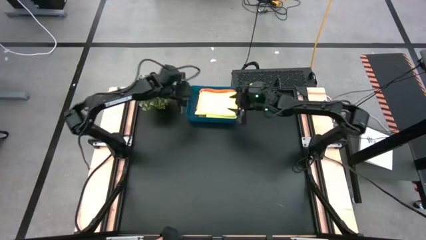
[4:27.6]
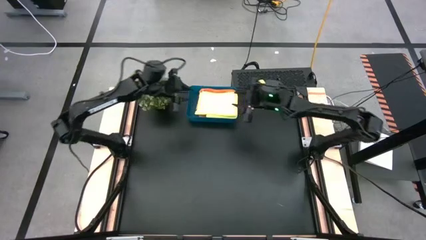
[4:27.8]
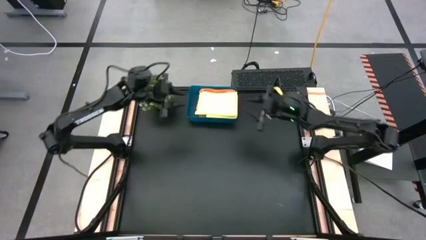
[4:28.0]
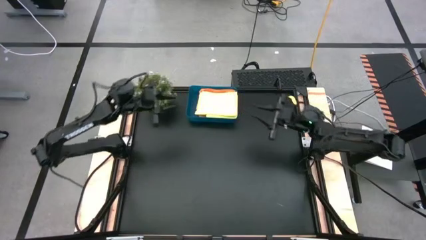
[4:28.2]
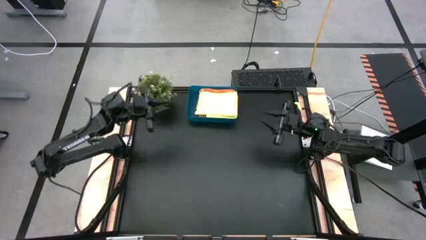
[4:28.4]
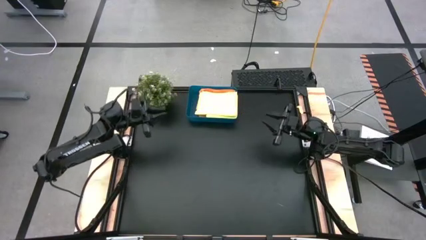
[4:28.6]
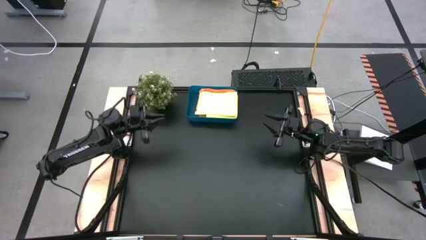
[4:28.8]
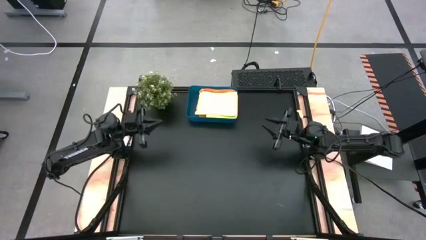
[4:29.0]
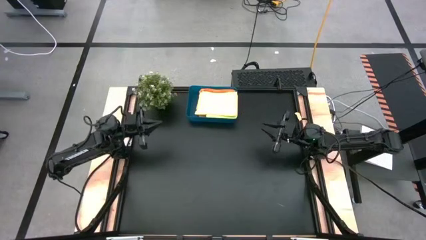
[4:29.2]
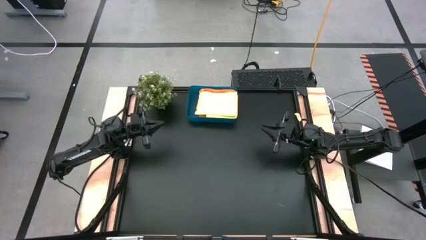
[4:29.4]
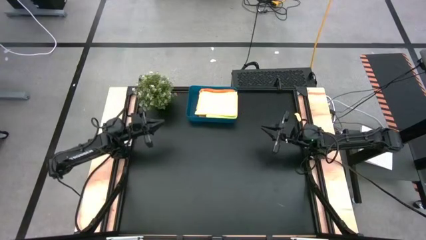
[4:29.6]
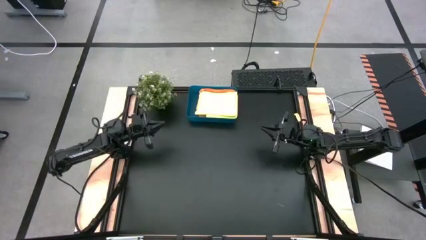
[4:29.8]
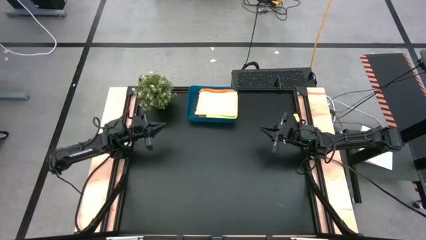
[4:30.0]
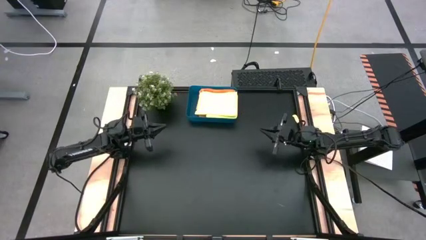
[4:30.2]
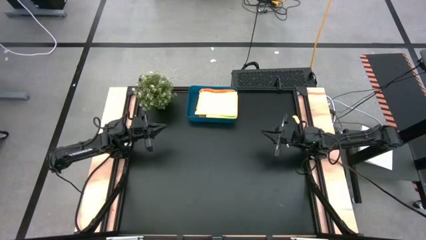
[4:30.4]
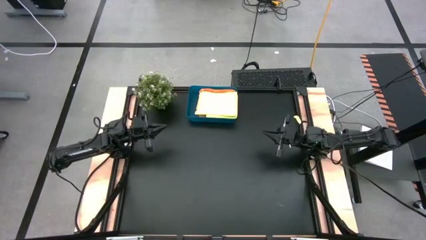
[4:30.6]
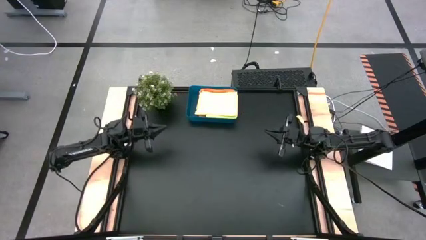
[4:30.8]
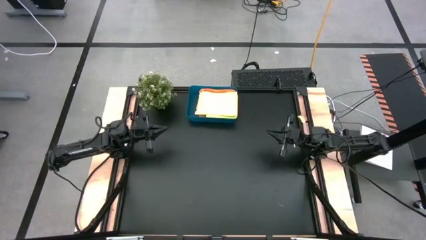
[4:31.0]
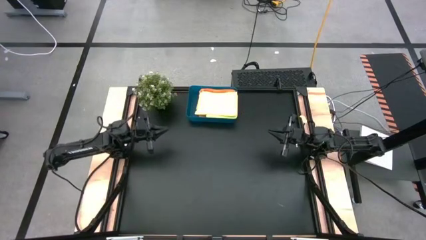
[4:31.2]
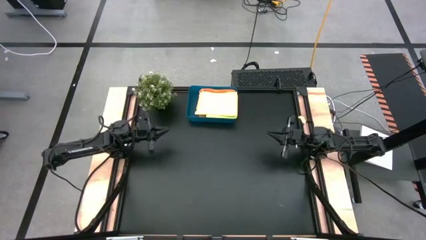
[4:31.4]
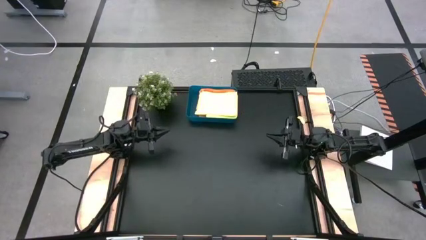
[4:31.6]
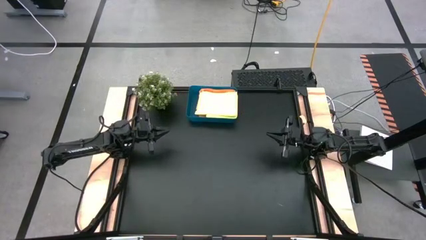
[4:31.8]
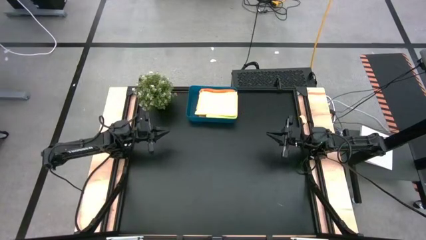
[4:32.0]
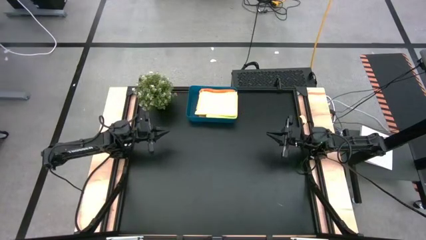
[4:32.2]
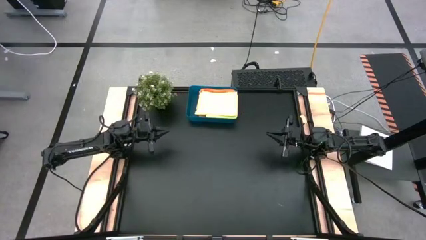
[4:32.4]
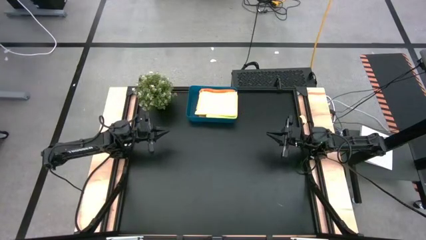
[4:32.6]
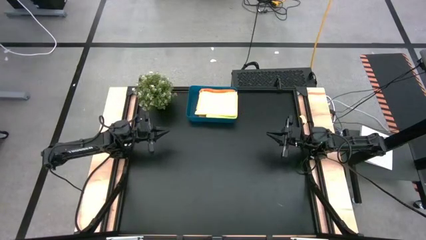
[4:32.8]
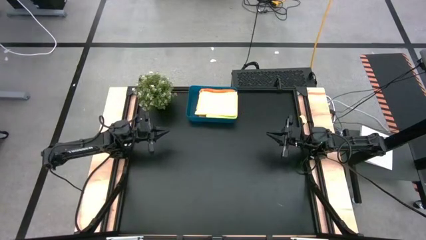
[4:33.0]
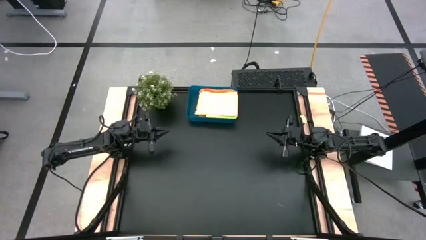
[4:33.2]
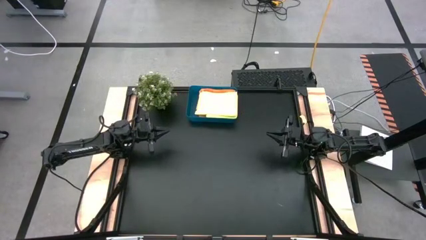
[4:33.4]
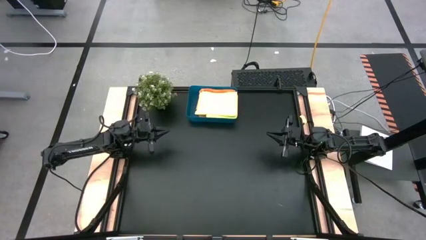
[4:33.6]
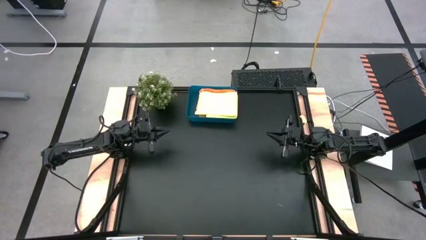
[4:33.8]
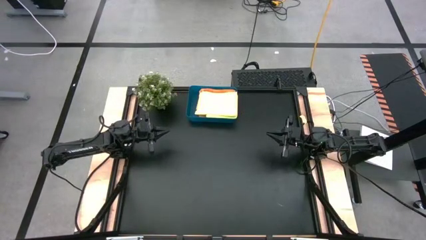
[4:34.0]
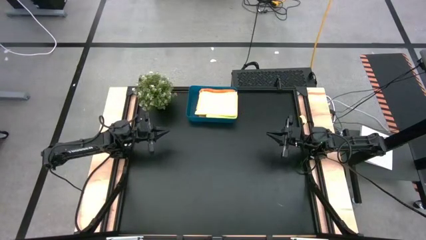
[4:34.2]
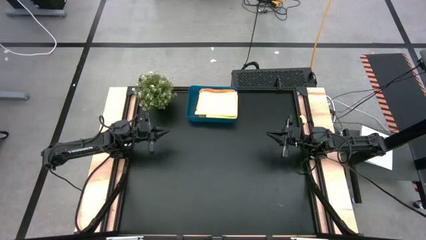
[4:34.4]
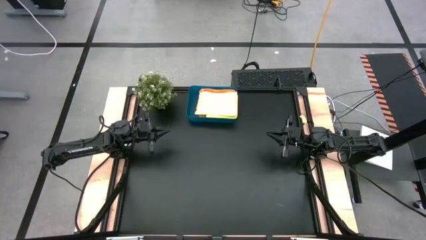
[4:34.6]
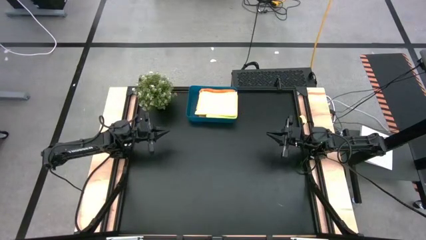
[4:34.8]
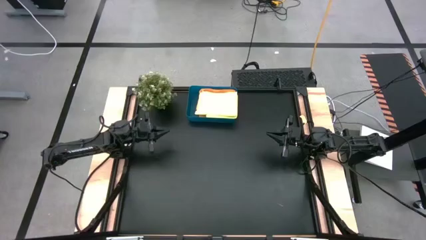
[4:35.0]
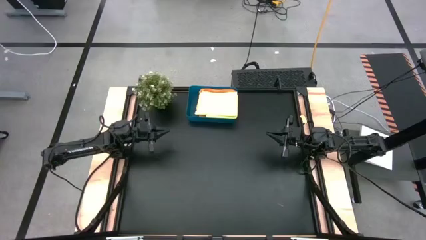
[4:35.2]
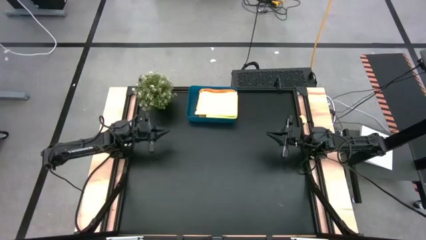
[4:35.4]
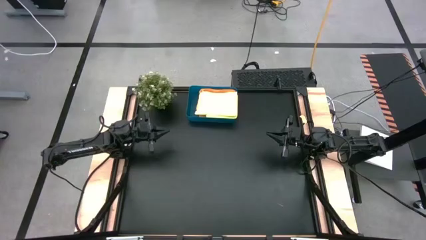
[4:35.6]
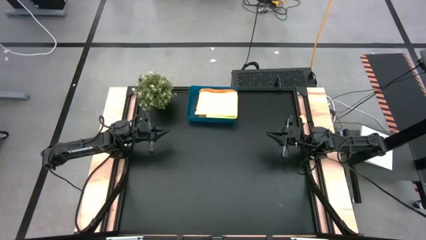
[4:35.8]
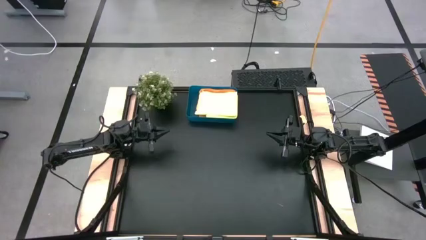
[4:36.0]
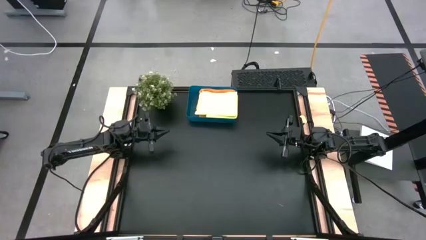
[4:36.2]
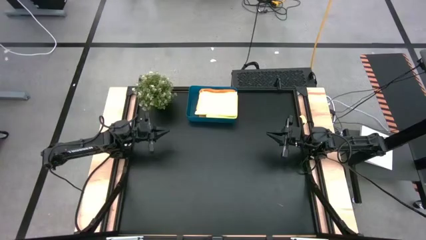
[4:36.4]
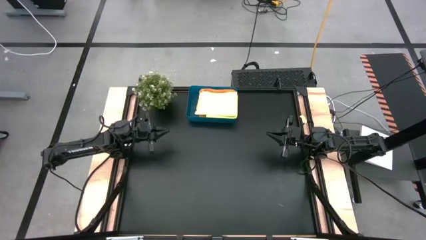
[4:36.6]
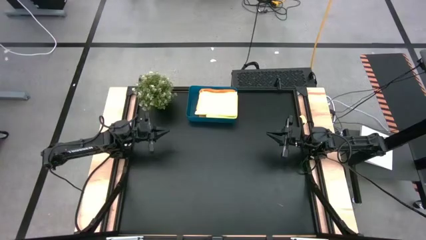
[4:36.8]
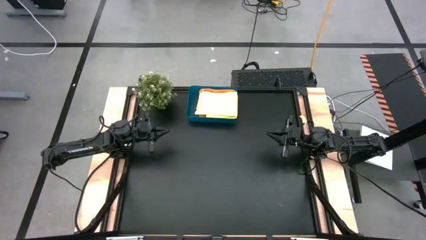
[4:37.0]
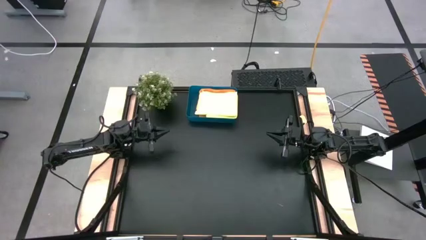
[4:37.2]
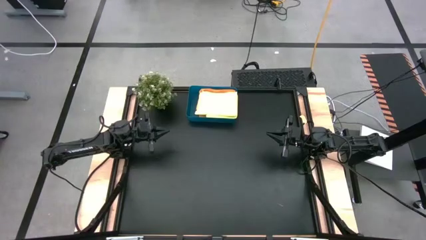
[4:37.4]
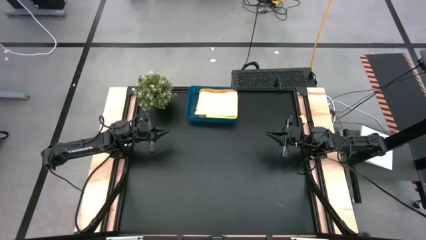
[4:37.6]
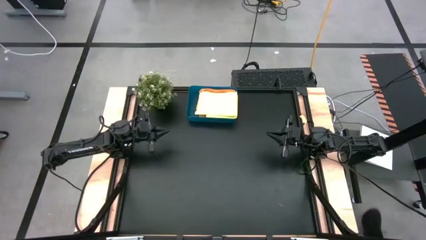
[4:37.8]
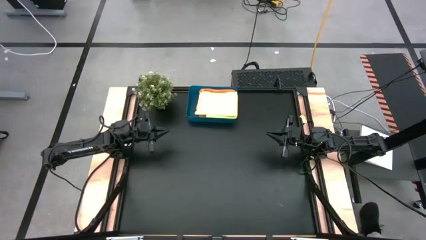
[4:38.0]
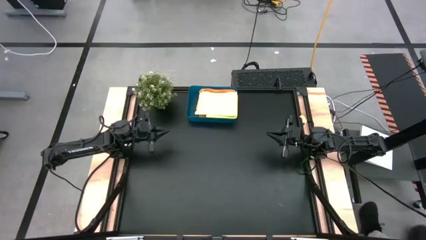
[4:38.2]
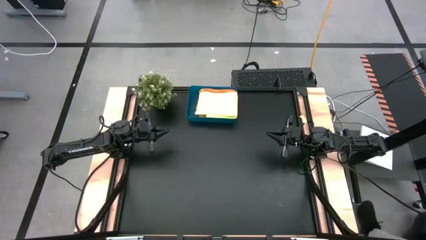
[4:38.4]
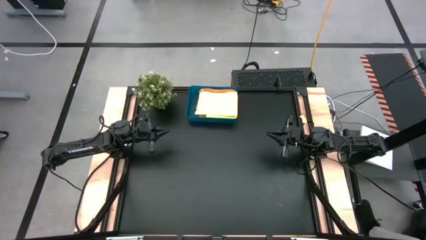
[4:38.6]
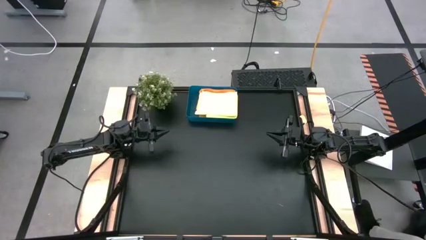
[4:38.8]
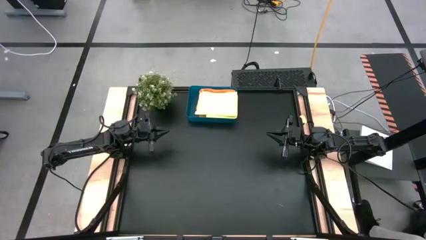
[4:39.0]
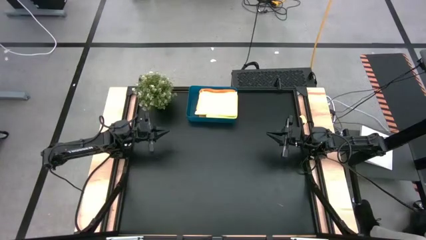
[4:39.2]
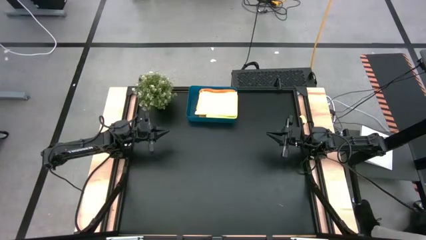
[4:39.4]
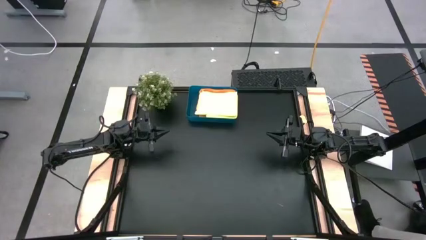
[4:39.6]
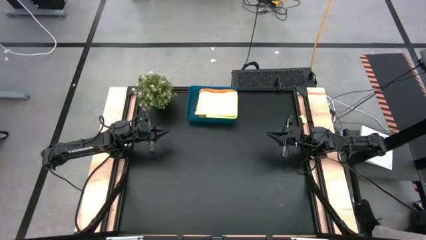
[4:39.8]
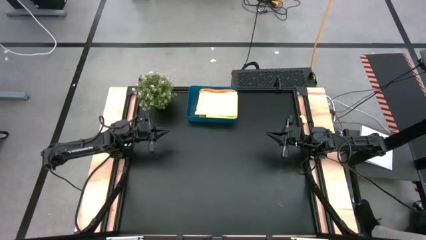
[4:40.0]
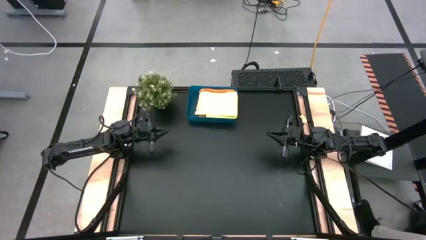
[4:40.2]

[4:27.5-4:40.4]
Task: Fold microfiber towels
Return to Home Position

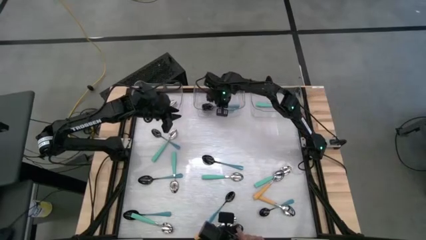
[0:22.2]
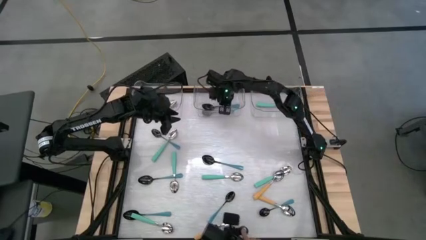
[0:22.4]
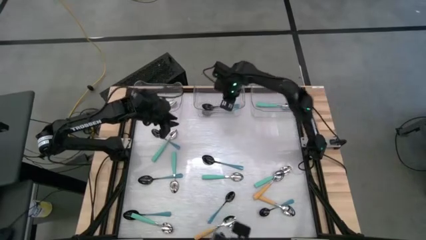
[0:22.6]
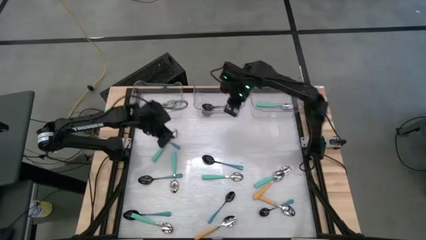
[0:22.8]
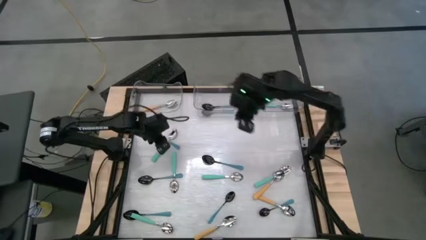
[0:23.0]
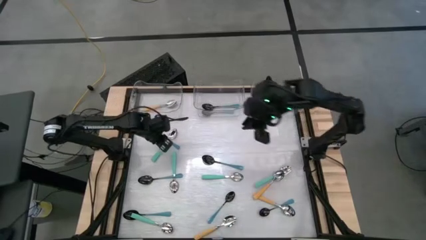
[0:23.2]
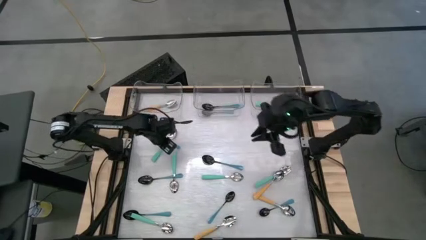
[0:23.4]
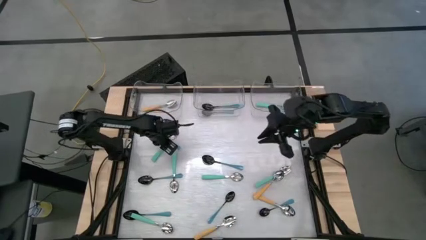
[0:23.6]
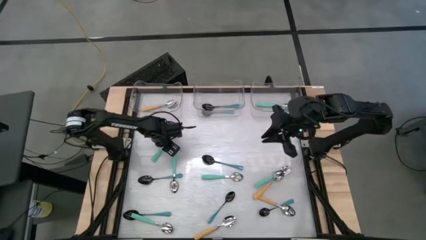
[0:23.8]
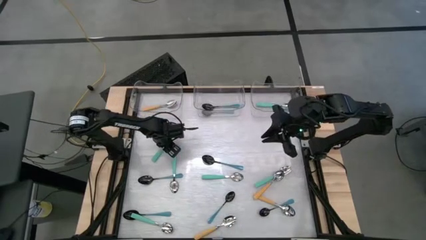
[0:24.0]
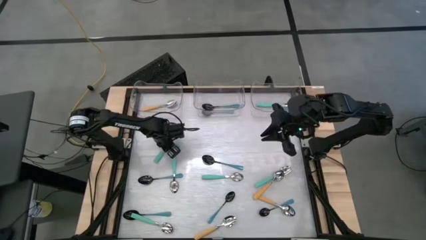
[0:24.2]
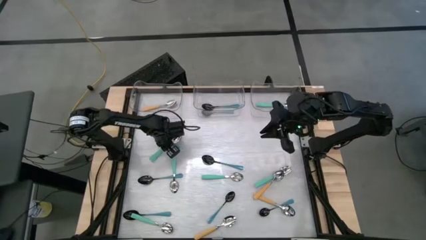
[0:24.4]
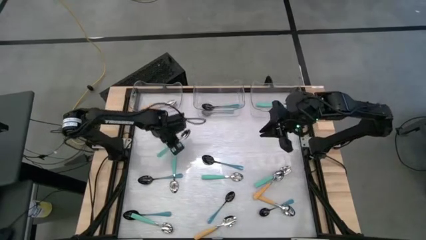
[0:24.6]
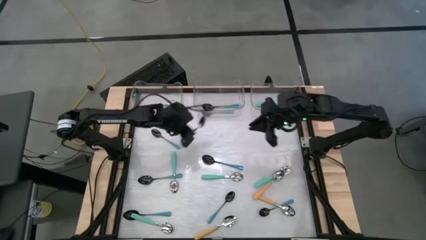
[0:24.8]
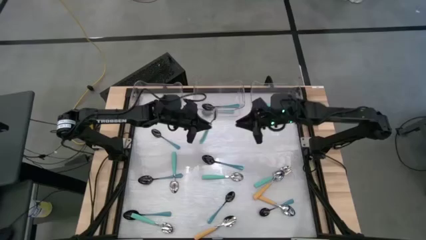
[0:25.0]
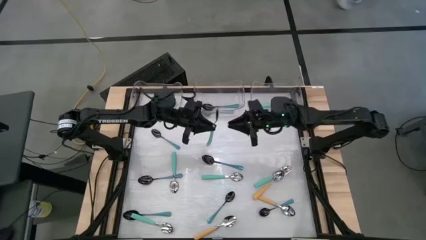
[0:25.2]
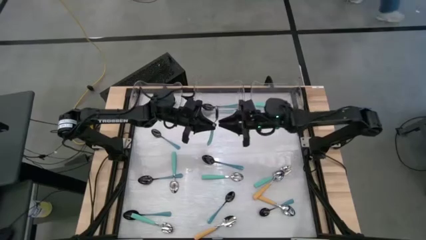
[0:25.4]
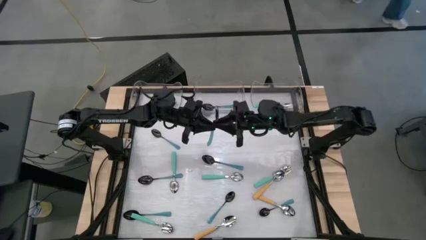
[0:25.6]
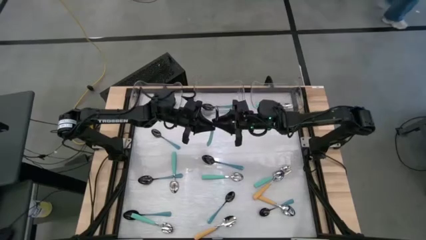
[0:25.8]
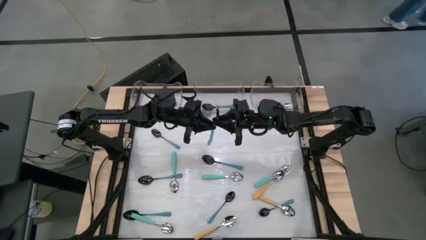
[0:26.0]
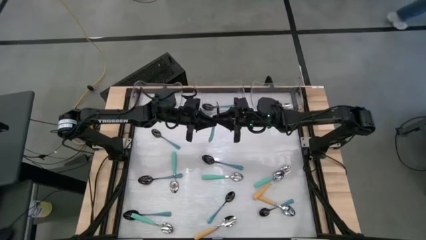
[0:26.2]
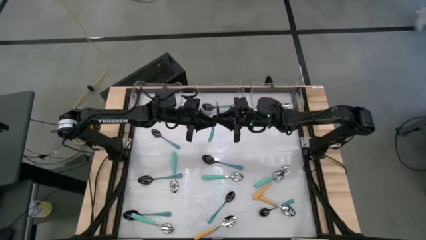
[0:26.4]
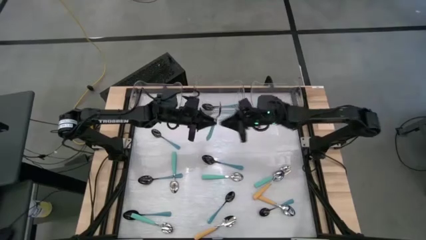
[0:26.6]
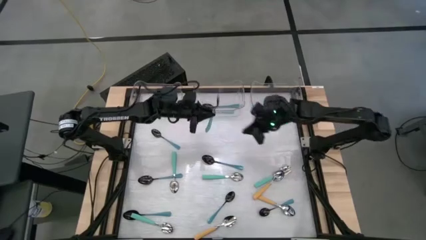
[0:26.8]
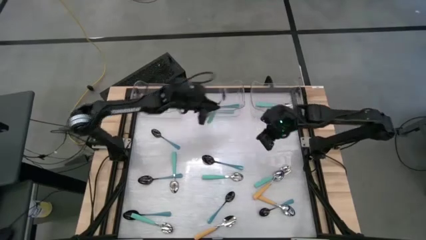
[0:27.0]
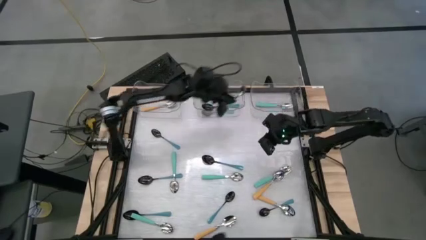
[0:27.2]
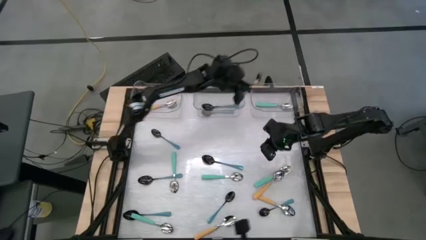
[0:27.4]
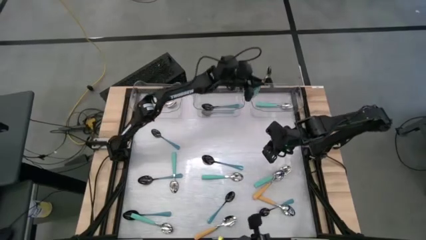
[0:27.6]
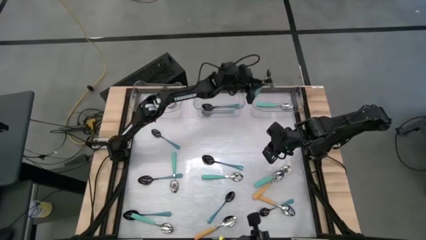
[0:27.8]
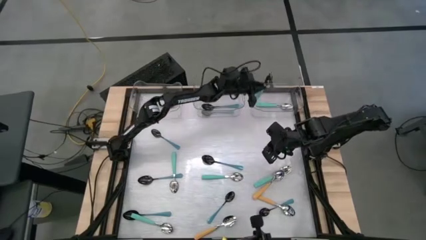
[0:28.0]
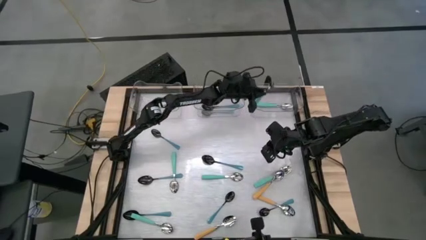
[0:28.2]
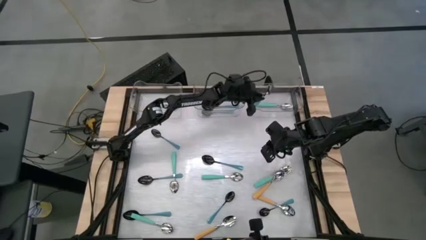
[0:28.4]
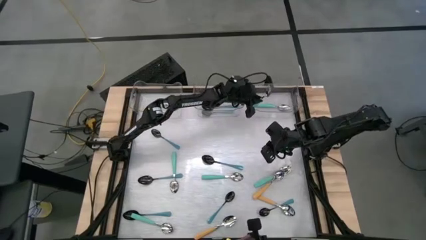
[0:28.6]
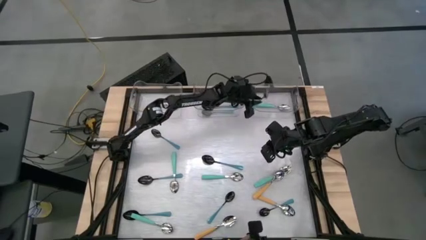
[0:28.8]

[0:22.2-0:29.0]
Task: Sort silverware by color (type)
Put the light green spoon into the right transparent bin
